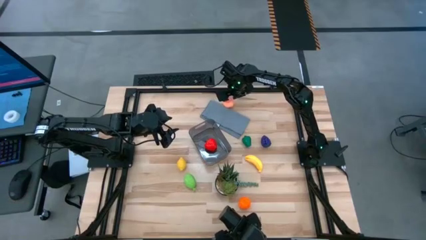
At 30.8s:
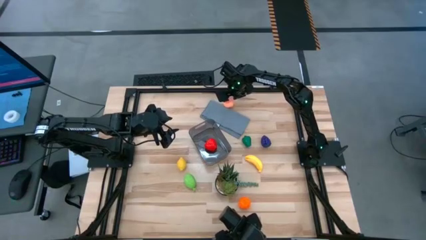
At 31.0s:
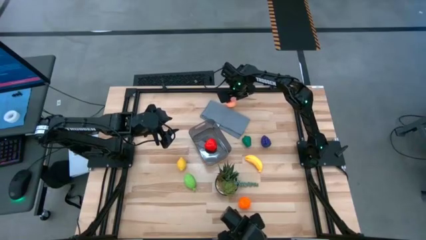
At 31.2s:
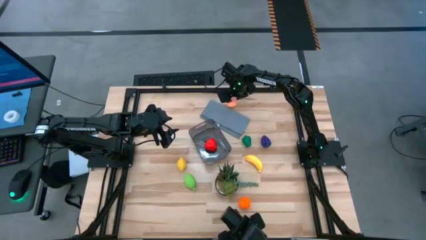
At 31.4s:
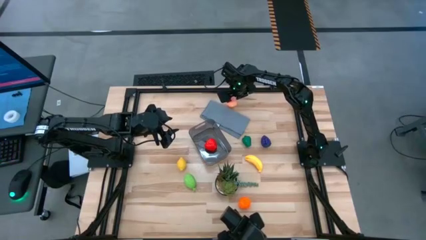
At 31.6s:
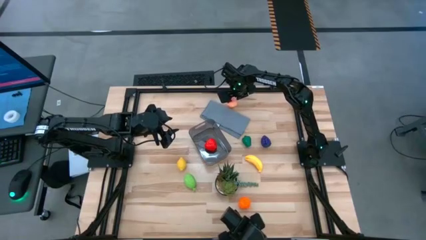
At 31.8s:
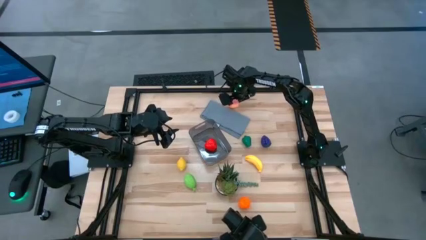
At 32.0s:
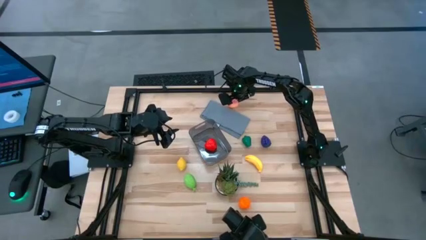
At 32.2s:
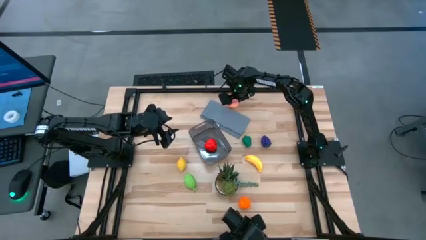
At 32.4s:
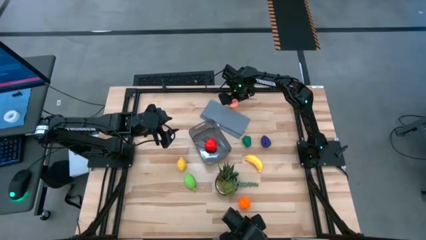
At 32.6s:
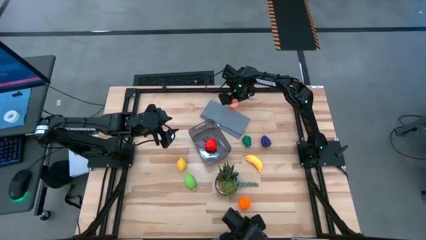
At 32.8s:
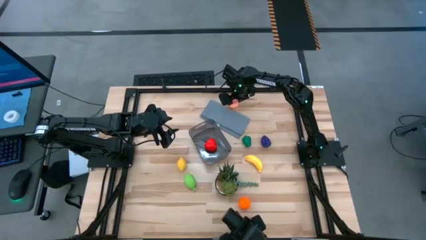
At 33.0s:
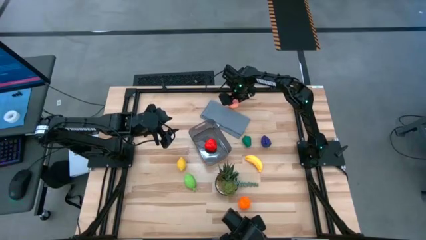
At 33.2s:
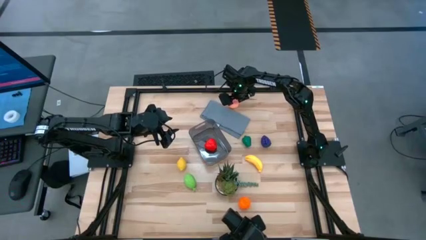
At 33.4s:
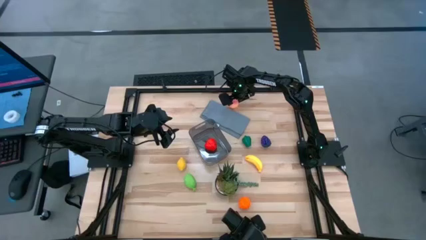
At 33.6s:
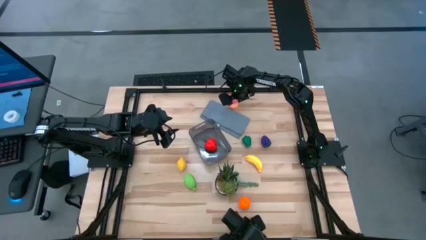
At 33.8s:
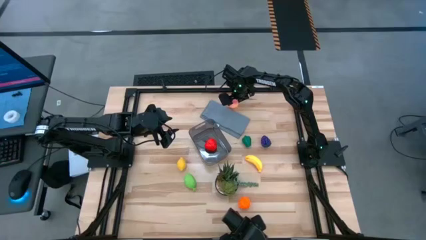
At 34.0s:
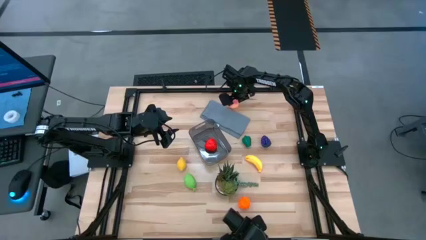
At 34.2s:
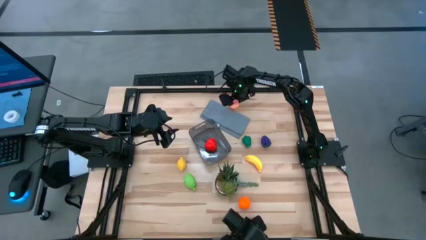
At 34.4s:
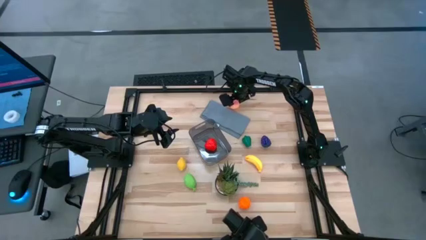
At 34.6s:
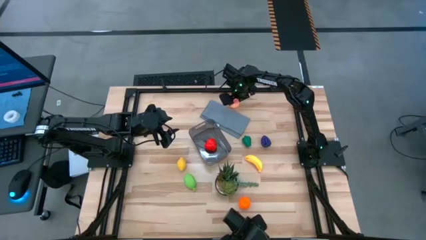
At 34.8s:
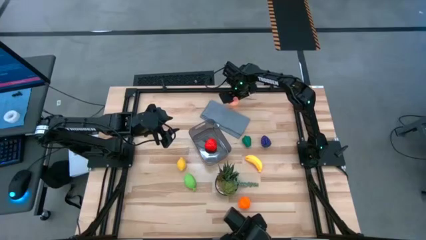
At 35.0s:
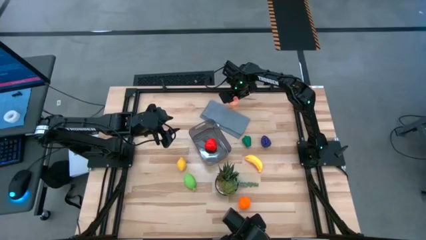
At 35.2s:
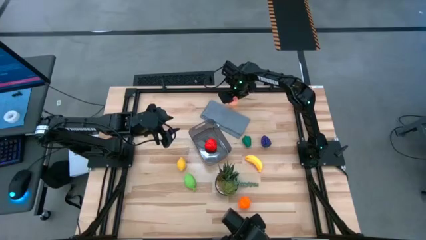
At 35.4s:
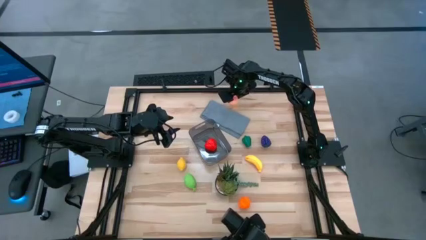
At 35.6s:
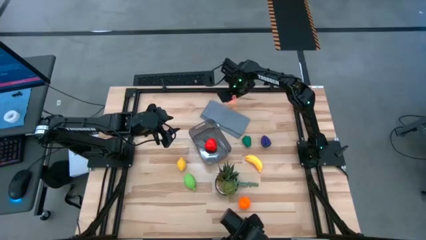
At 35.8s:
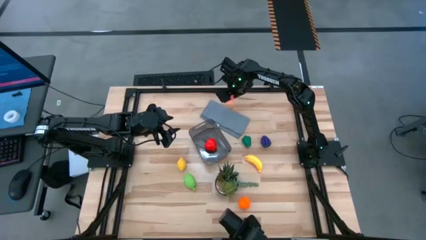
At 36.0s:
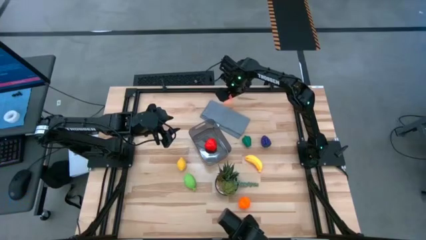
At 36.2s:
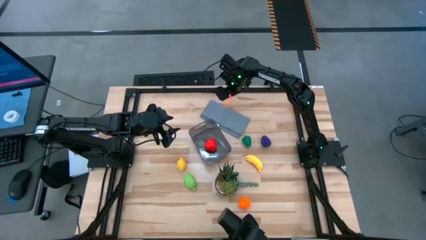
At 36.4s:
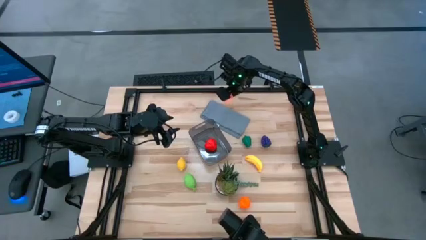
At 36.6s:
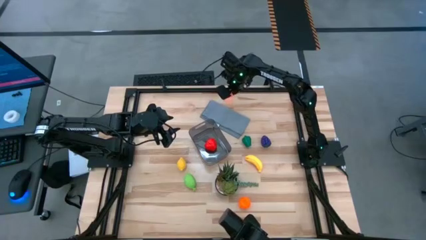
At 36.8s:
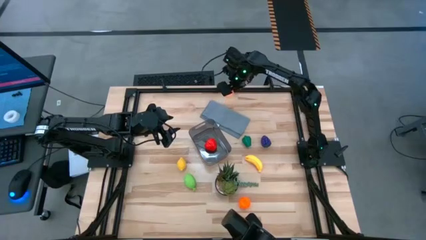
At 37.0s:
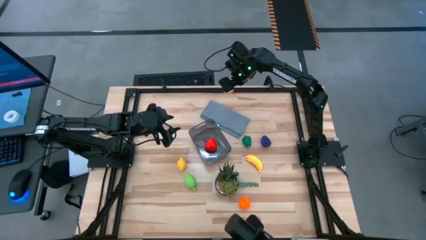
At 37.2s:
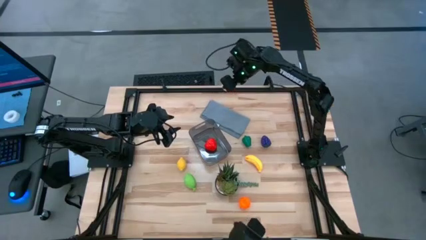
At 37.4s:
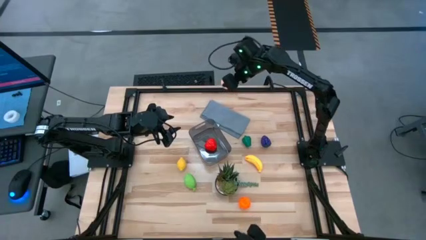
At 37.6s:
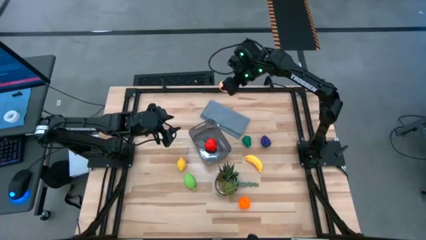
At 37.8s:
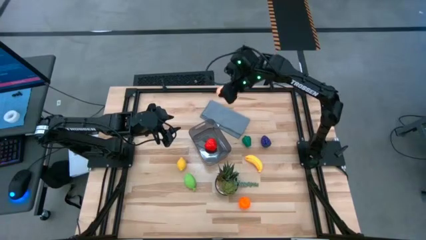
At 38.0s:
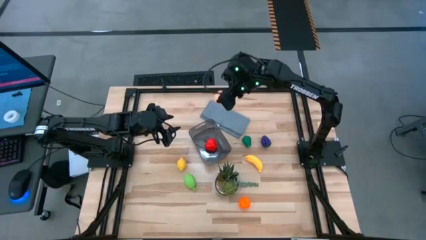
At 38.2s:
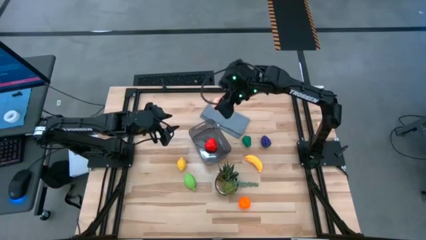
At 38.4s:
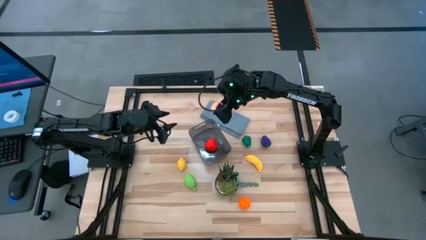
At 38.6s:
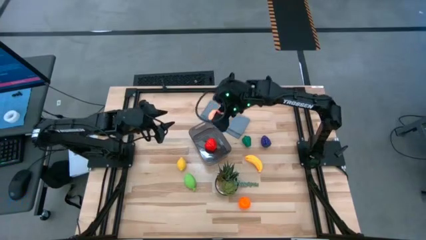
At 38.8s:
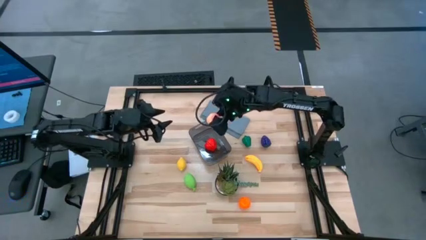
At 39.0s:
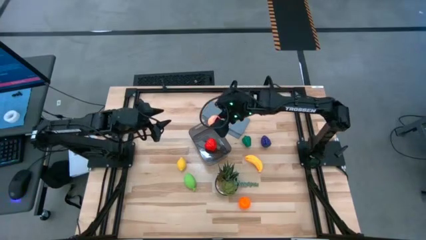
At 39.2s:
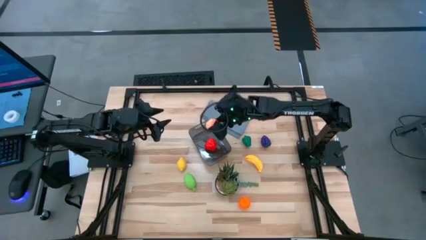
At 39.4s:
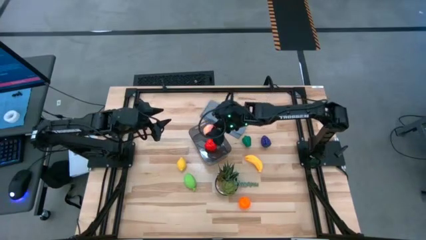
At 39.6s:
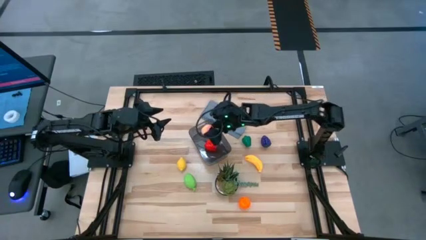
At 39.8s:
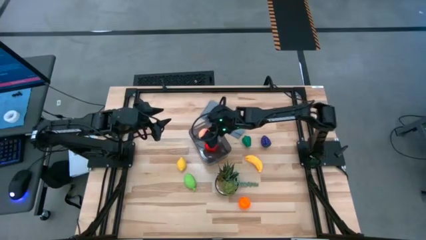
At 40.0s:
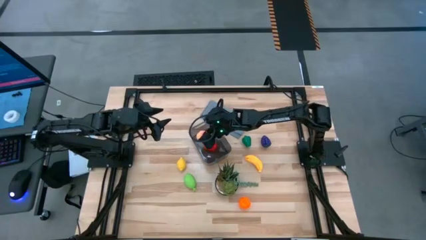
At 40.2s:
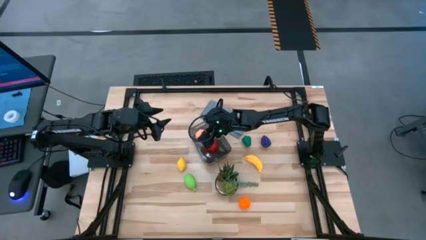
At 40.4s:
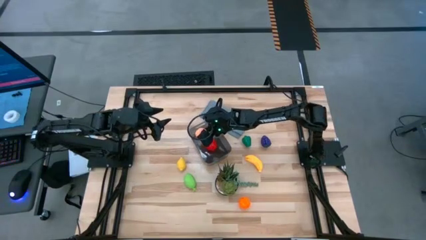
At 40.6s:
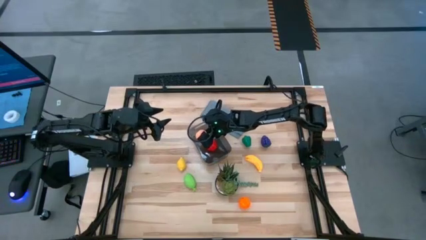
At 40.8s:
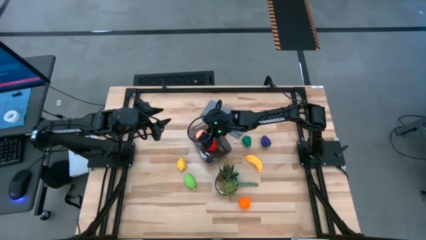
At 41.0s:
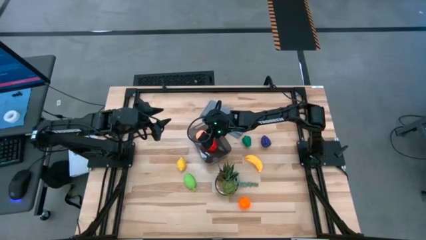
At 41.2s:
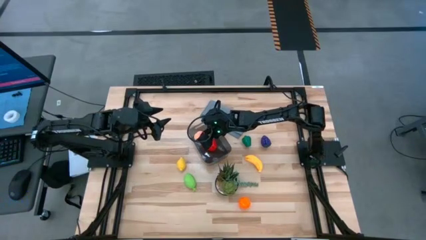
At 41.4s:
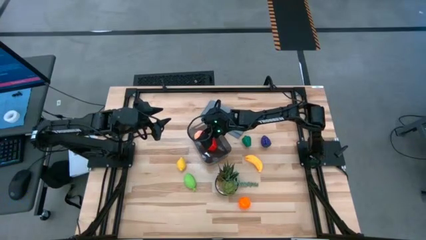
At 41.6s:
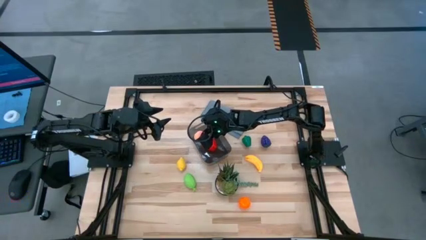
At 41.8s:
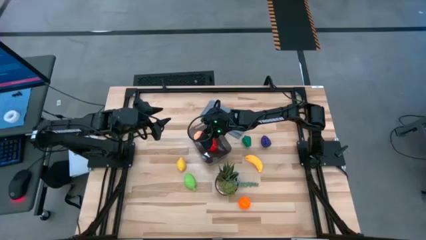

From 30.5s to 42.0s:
Task: Pick and placing Produce into tupperware
Put the pink peach into the black bin

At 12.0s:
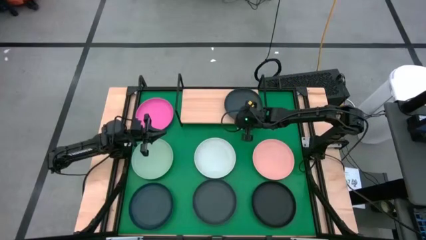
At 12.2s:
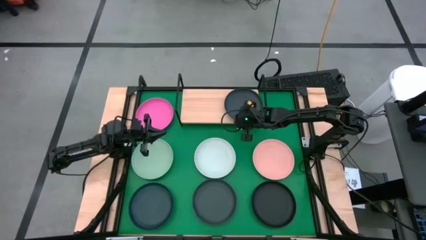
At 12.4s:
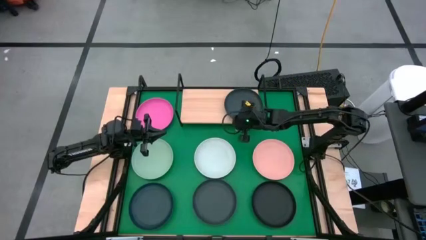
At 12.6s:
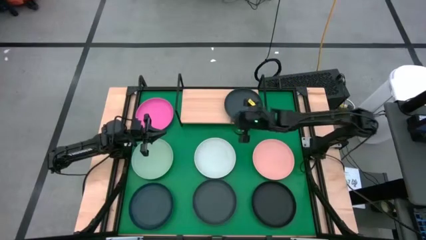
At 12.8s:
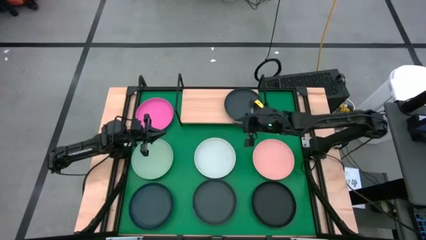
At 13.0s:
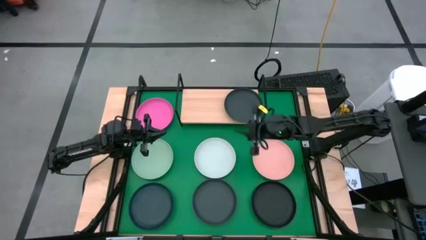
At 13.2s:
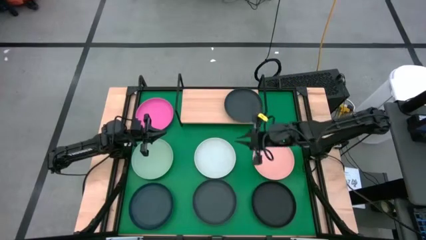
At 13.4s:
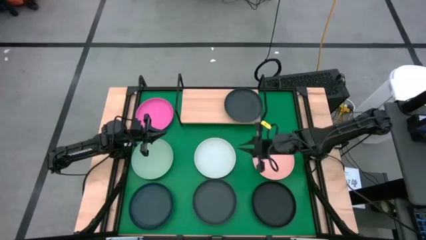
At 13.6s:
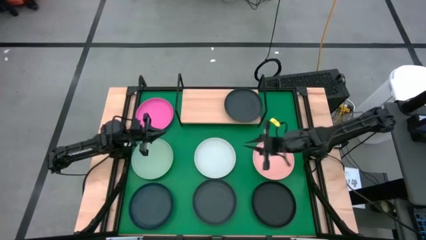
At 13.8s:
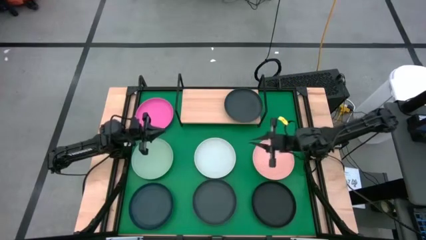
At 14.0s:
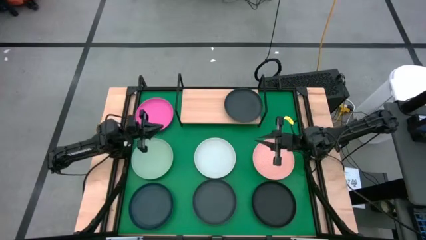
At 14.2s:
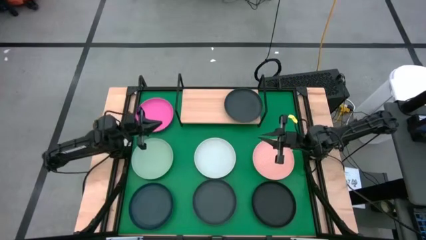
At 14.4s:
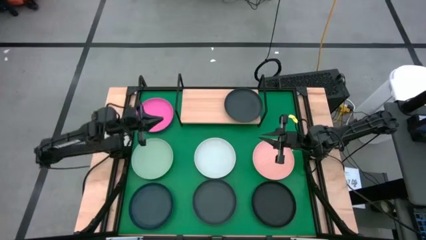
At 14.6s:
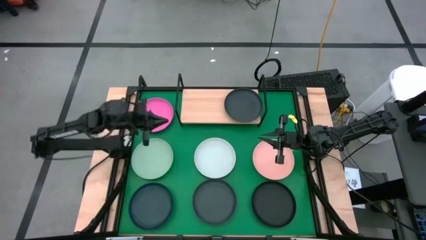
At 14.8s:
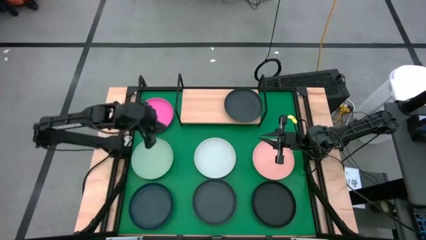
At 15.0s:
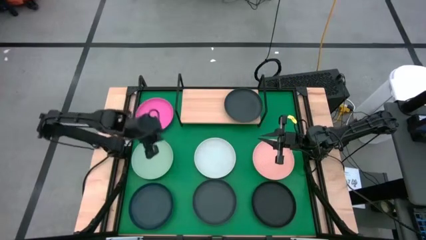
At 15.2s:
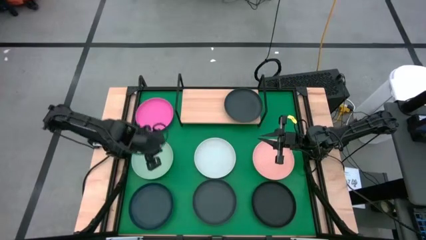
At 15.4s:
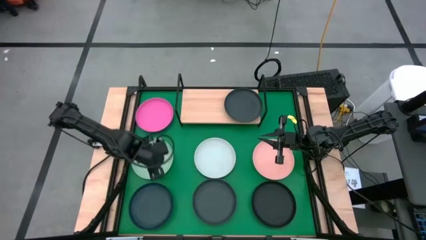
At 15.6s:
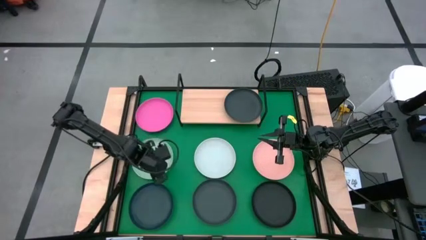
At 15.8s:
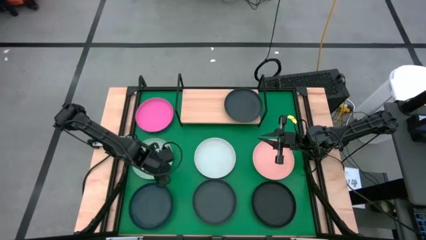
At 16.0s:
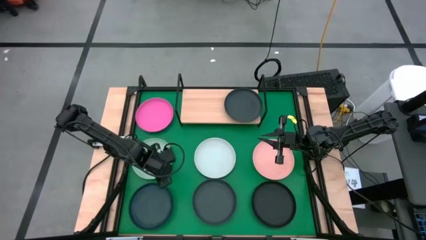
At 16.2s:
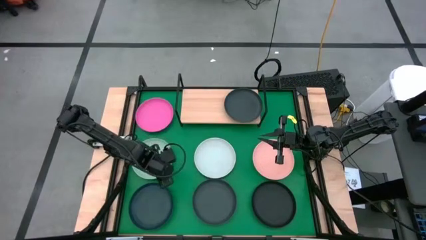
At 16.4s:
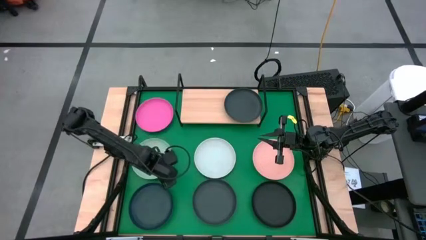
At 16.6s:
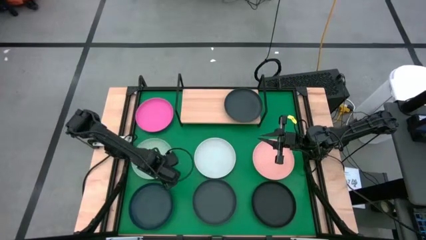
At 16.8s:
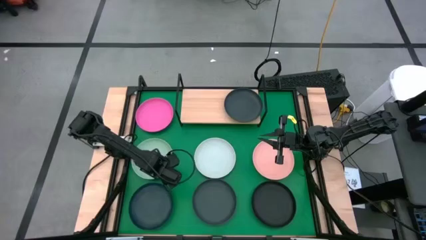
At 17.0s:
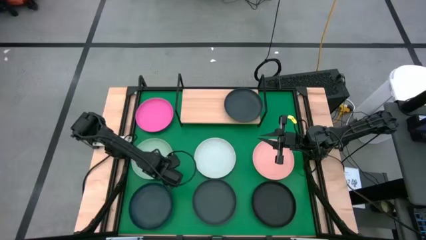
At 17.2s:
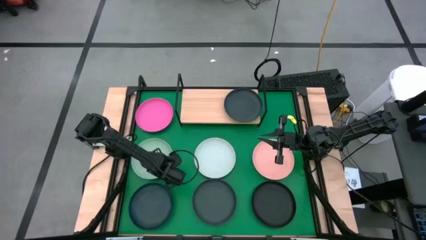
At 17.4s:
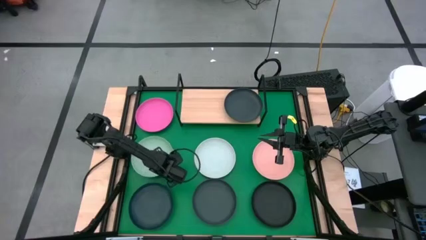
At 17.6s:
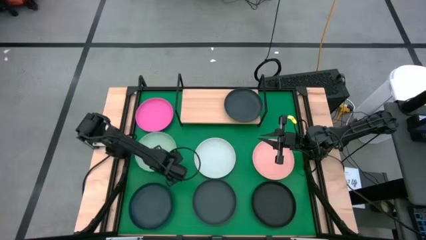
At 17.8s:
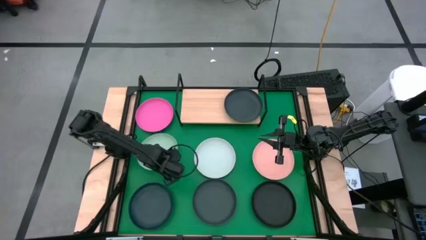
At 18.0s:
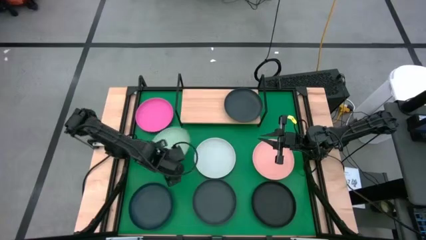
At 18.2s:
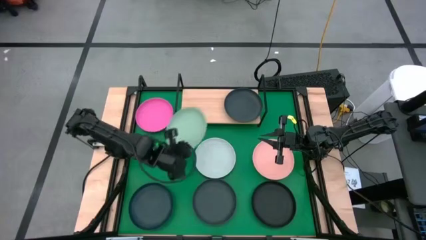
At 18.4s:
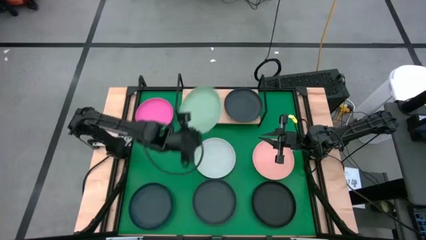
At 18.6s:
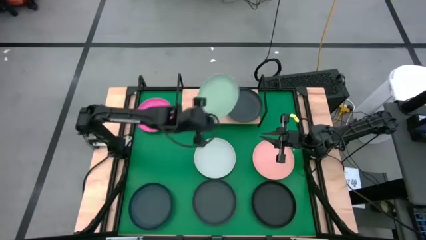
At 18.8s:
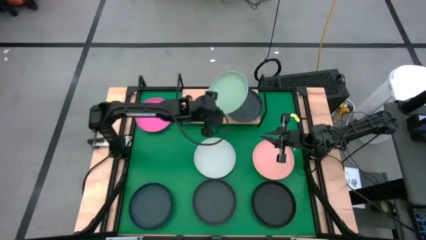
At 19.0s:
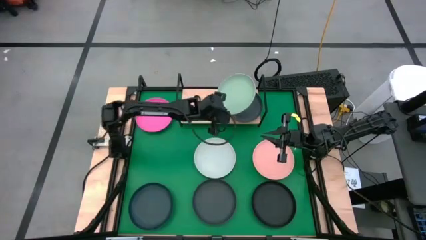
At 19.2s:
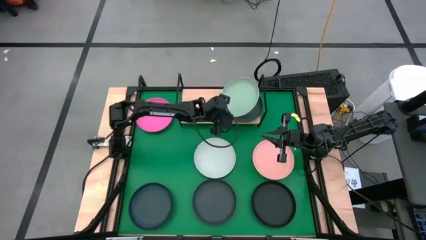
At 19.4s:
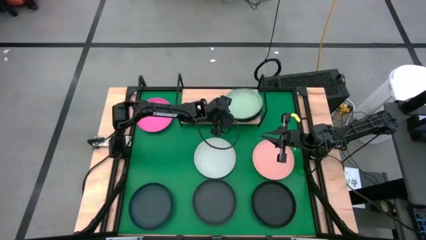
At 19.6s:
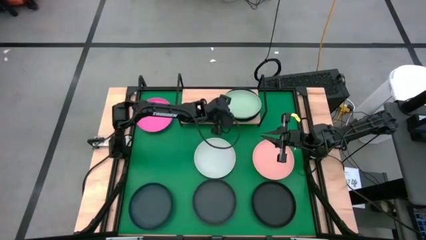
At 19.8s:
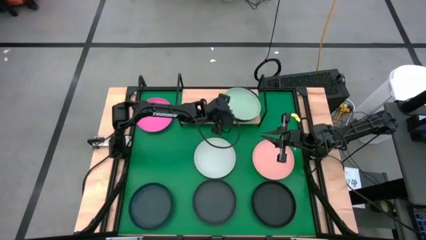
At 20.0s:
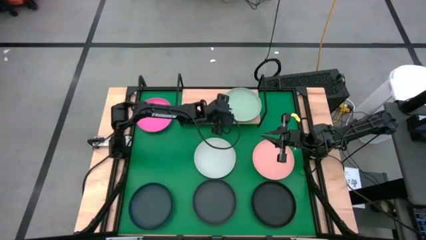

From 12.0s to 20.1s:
Task: Place and stack plates onto a shelf
Stack the green plate on top of the black plate on the shelf
